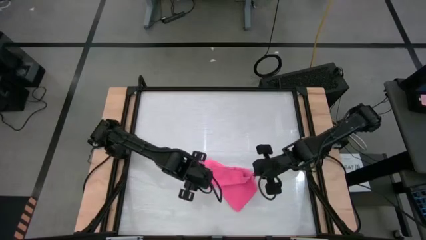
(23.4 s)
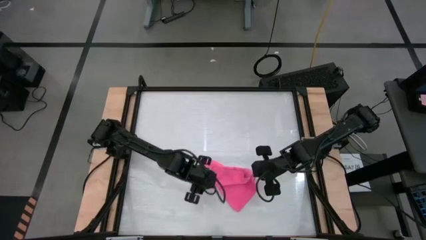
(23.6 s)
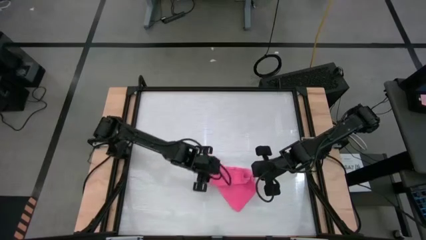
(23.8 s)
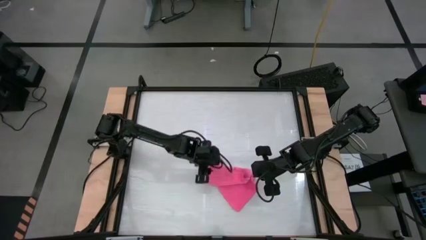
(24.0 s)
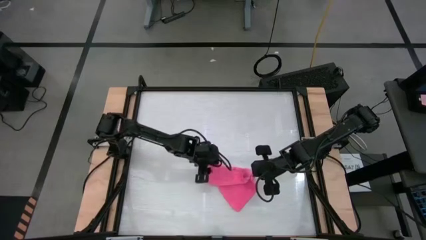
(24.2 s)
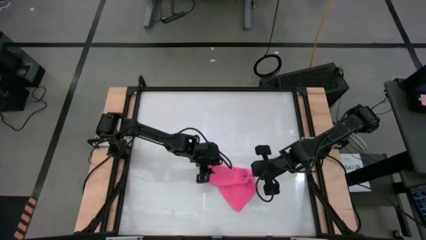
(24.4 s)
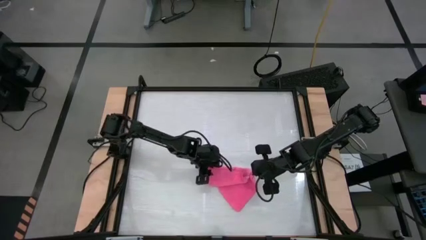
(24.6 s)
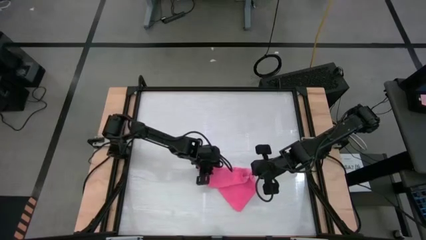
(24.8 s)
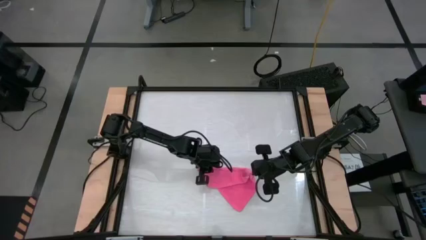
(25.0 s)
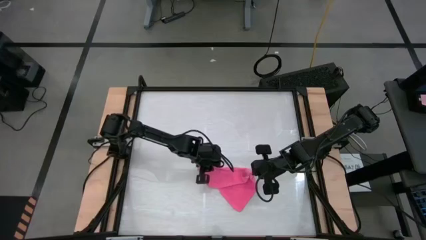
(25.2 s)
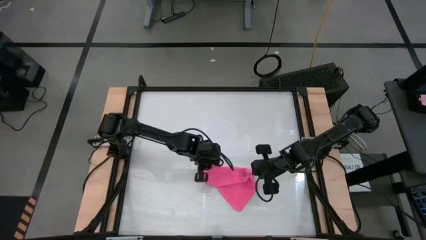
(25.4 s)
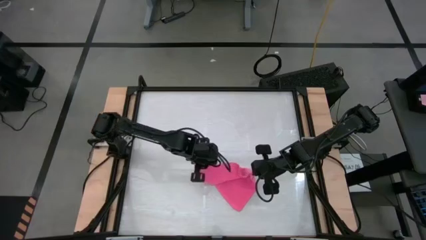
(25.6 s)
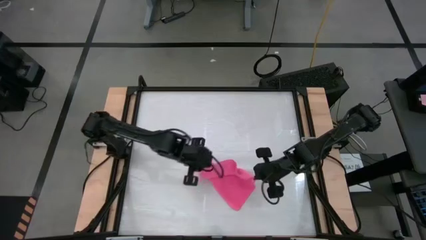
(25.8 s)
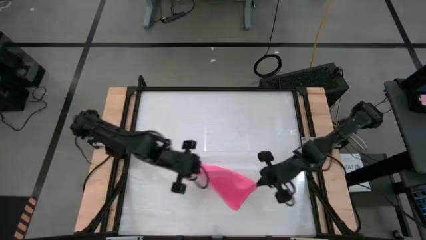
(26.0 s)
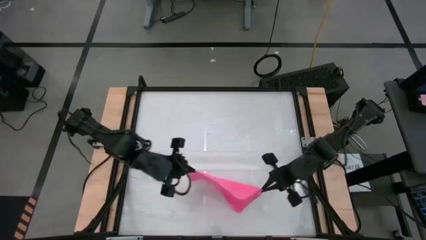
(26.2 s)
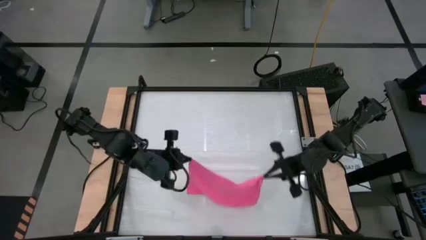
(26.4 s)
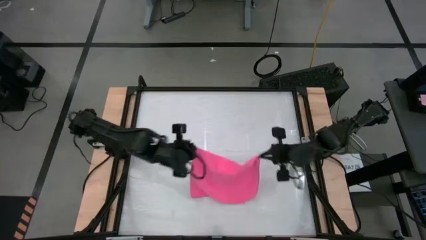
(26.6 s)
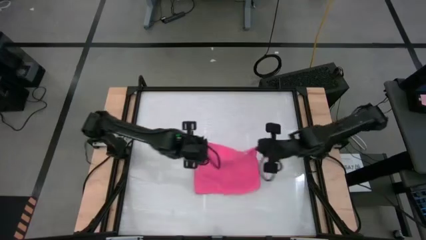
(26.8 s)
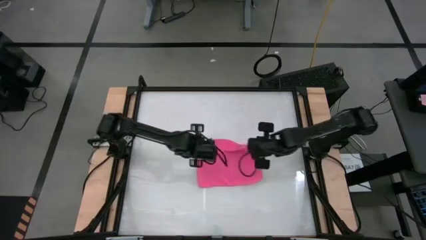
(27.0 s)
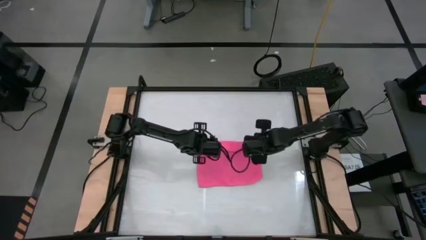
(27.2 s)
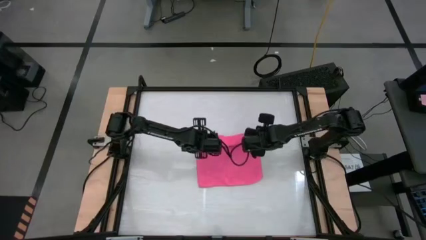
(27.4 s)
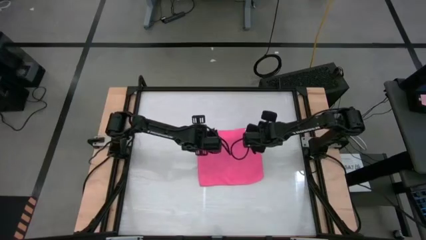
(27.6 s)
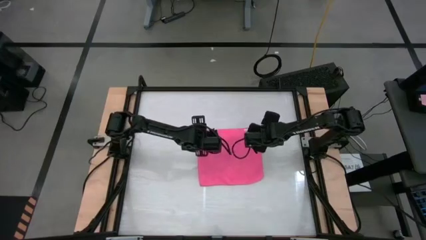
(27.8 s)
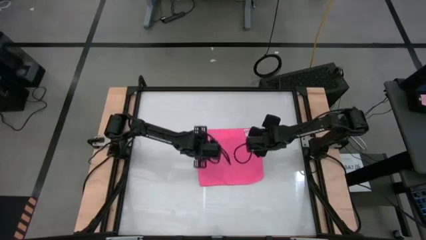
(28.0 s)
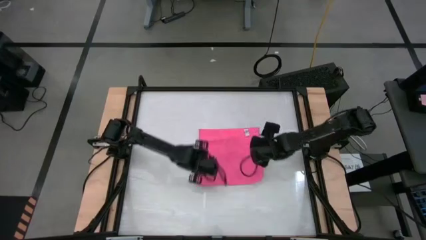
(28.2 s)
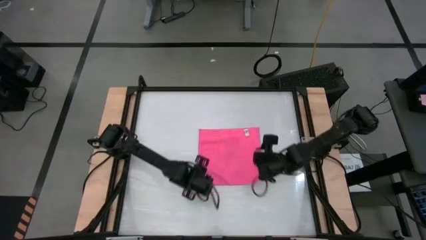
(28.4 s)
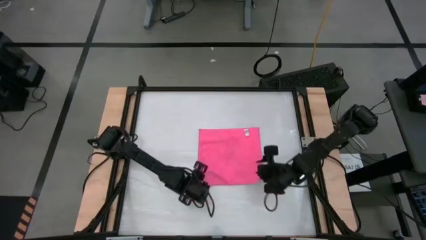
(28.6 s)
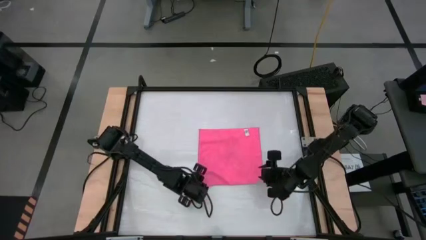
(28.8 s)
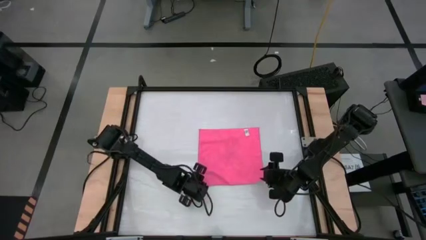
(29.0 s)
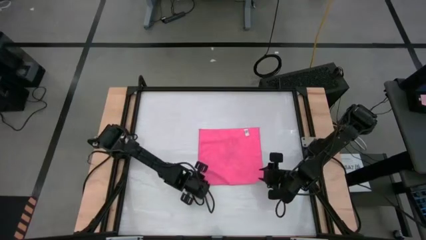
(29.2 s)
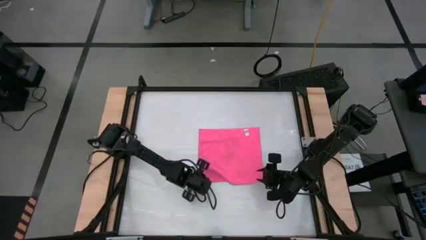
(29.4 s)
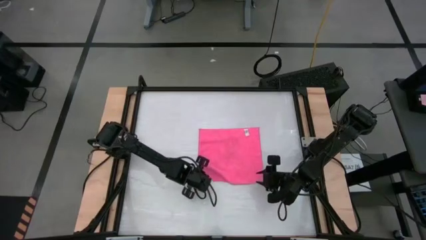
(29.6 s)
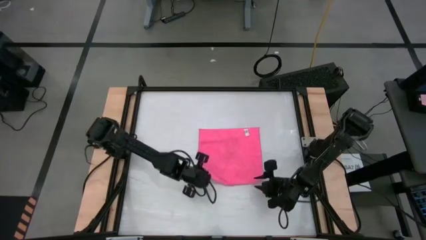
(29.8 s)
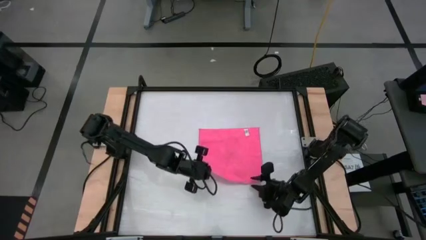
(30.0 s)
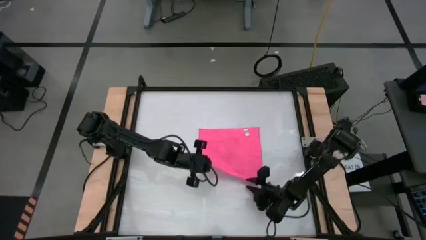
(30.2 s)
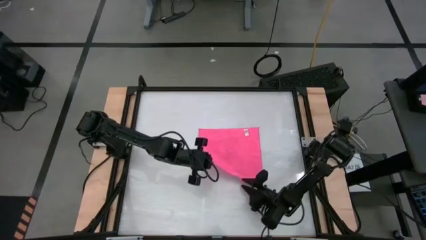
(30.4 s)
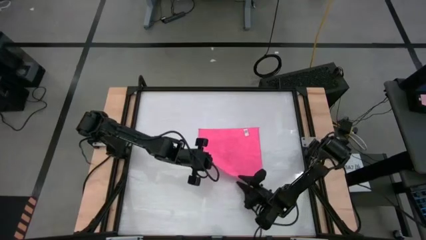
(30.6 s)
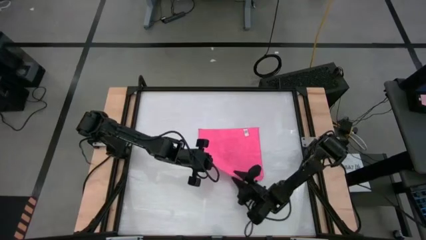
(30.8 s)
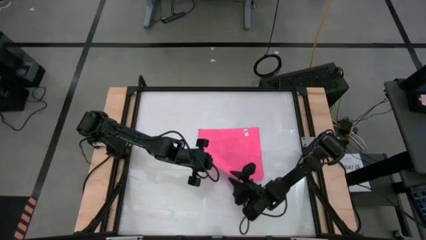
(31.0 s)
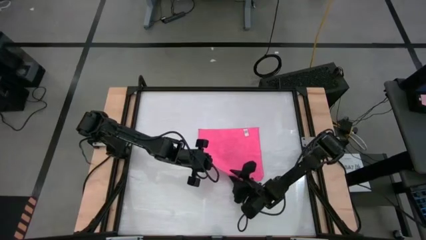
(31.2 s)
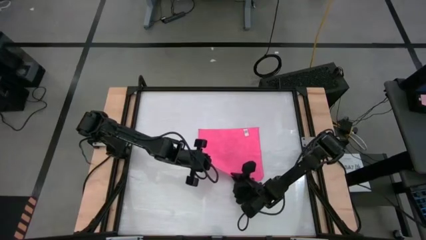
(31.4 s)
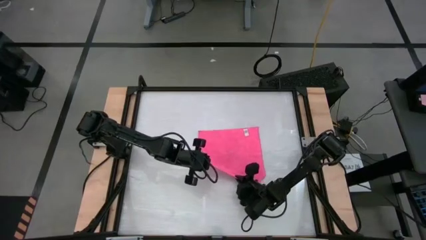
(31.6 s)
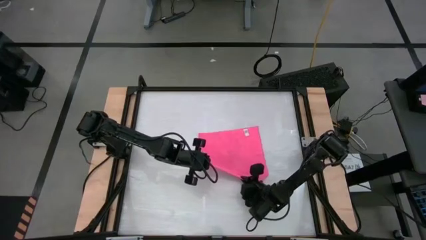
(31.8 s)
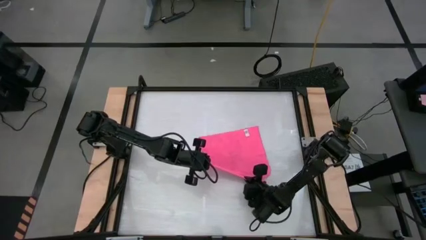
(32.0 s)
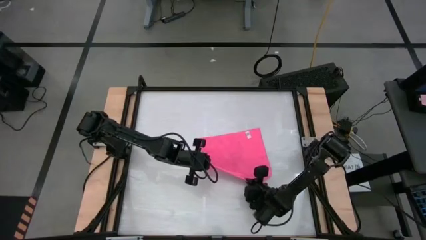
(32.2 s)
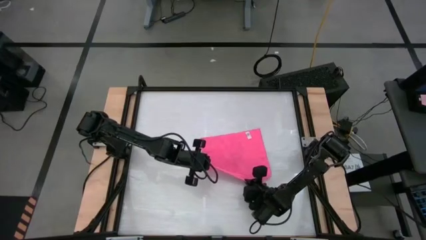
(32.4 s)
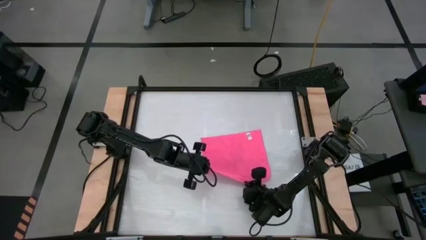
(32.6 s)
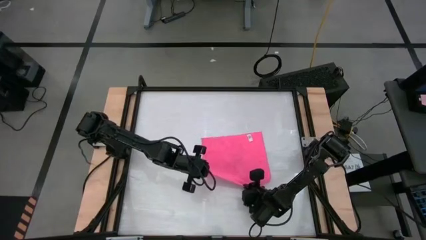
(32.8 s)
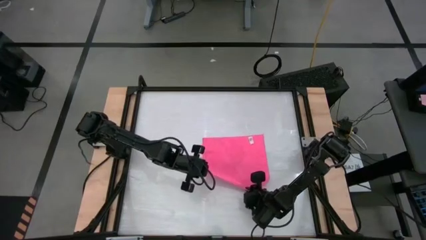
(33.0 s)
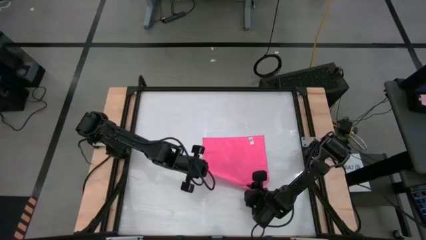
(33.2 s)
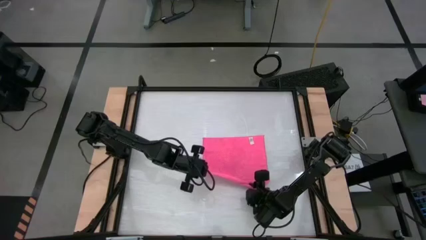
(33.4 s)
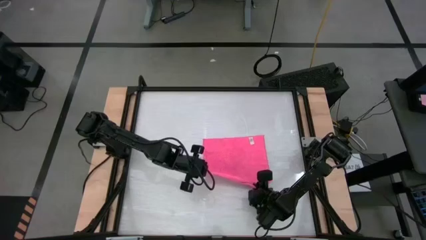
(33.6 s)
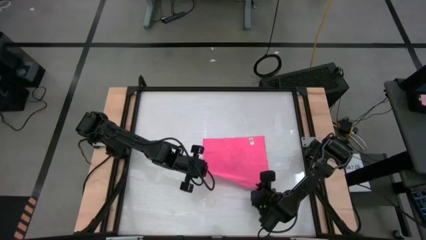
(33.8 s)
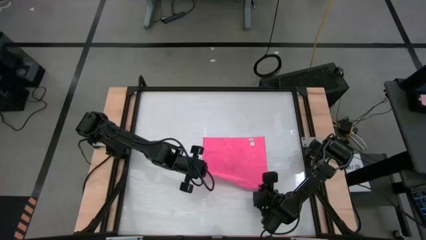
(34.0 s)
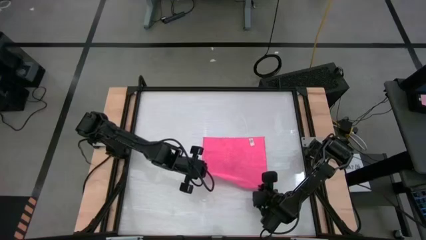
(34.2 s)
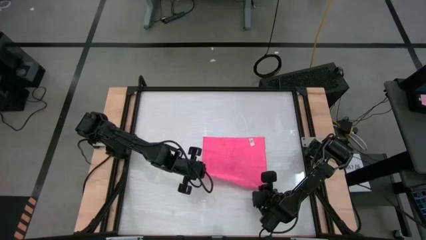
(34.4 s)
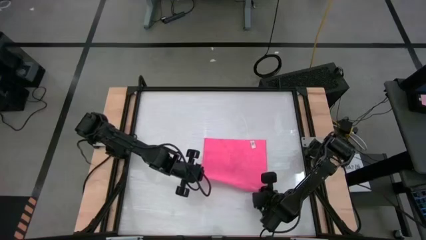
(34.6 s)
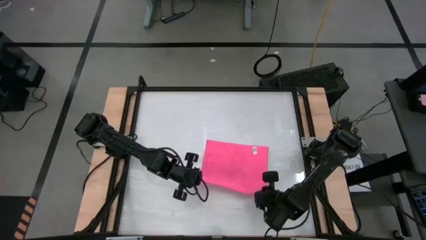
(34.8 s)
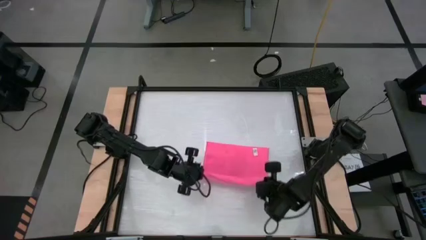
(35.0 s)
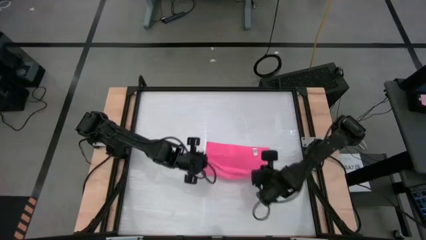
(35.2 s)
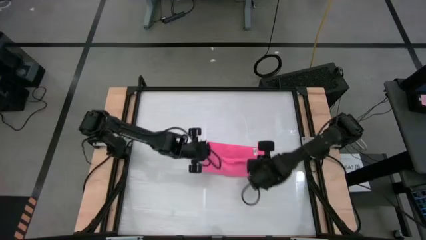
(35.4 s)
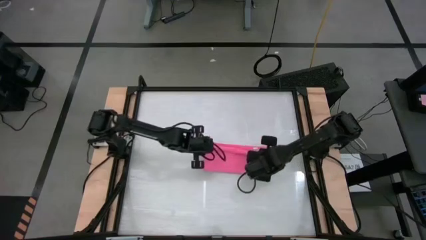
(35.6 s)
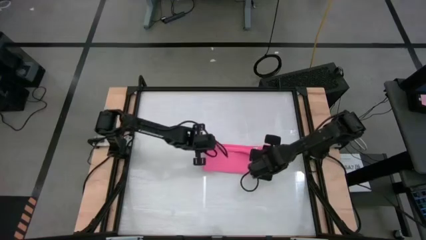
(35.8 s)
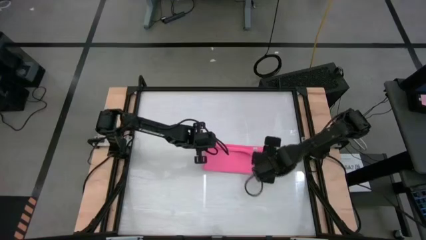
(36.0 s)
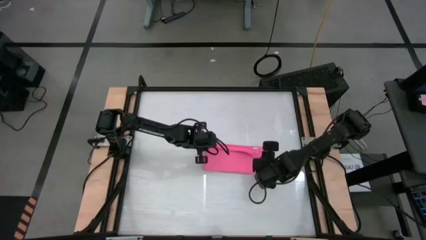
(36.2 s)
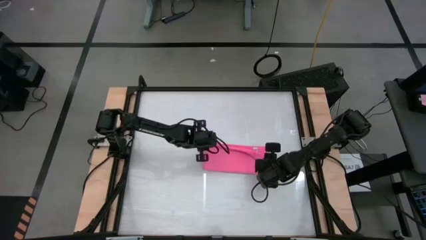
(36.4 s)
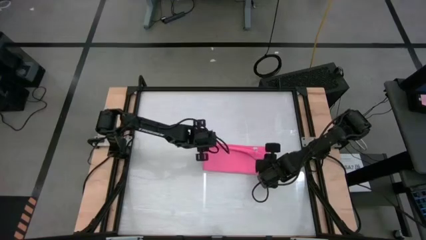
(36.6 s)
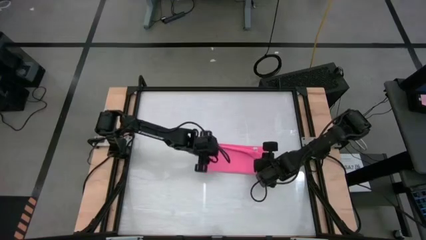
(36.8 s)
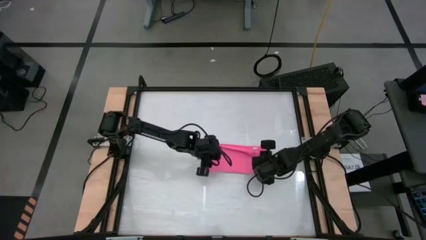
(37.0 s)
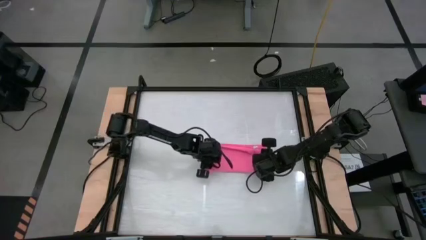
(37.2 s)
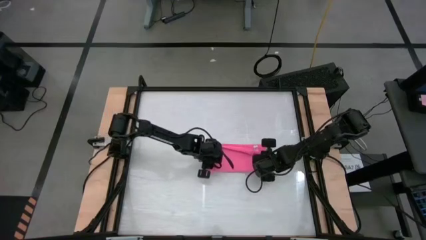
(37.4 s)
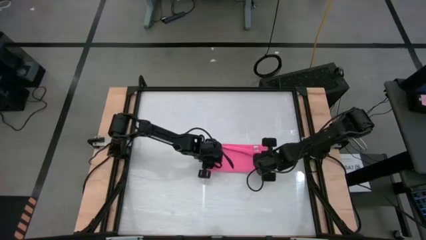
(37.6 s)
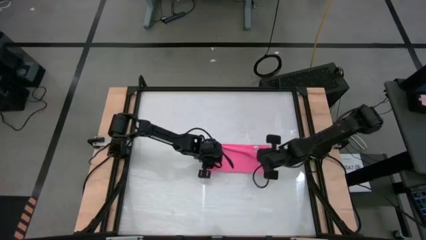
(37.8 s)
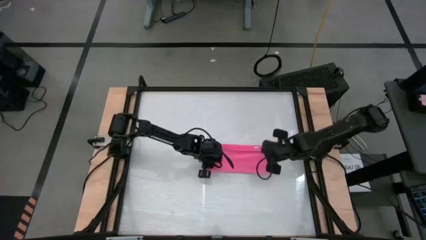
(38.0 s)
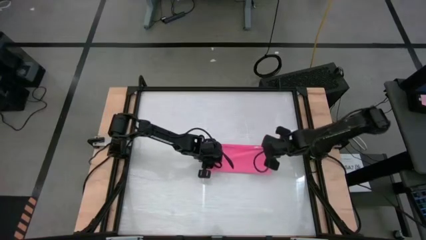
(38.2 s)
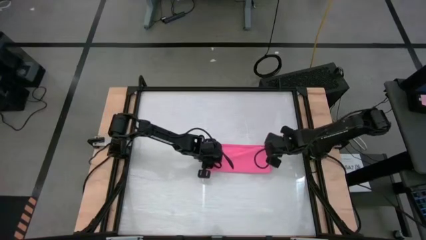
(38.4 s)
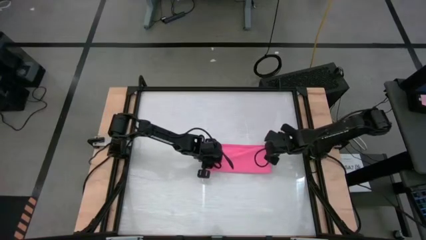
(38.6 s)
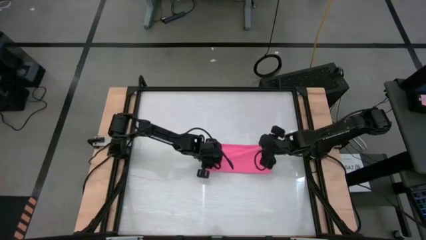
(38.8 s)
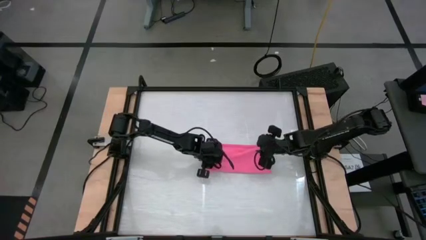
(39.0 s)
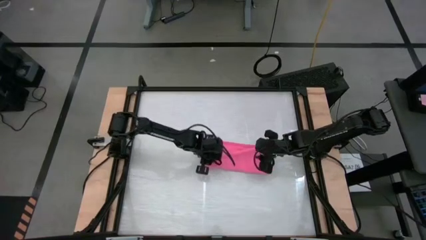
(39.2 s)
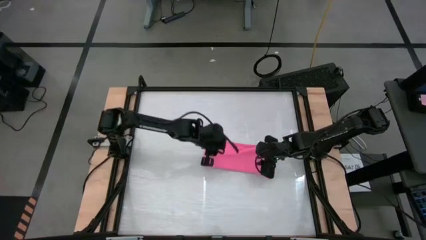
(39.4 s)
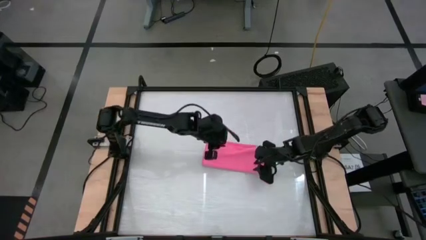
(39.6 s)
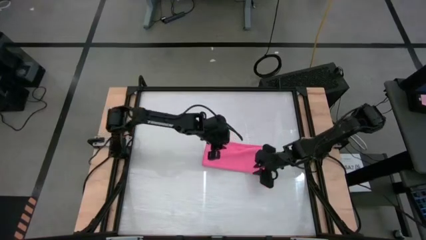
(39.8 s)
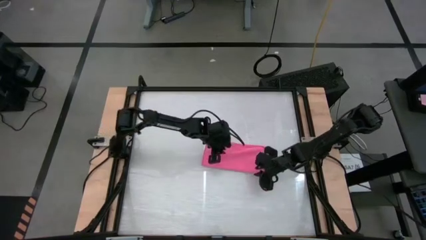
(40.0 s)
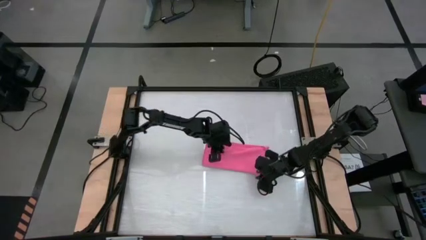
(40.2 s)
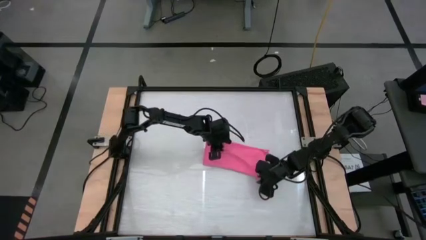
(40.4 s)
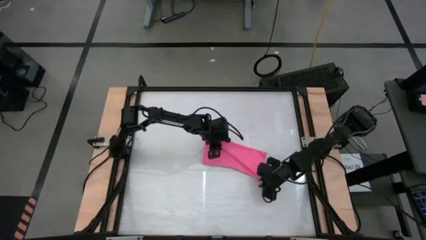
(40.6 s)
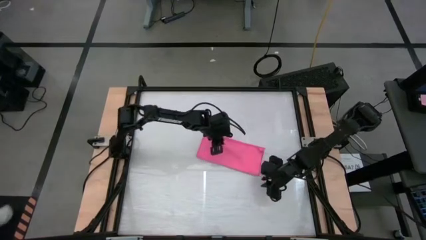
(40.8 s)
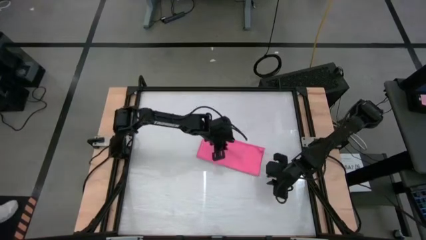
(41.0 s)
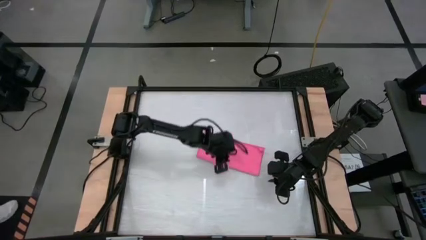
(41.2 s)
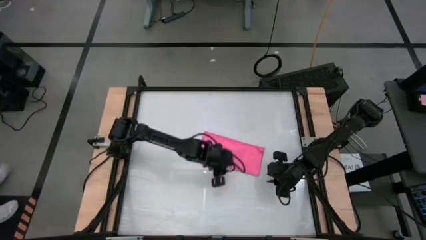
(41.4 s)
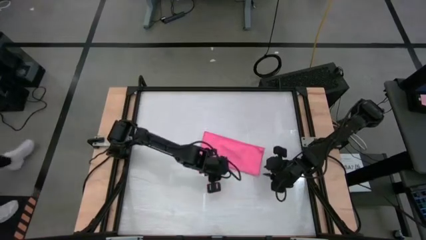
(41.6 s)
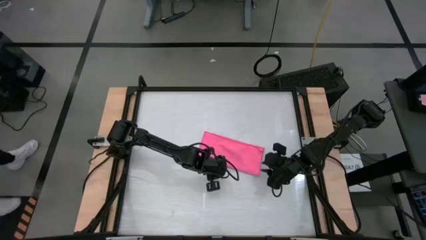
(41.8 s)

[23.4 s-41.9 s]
Task: Roll towel
Fold the pink towel
